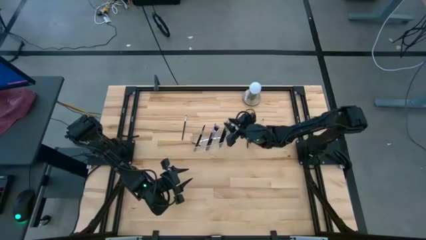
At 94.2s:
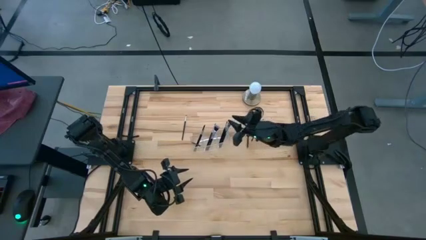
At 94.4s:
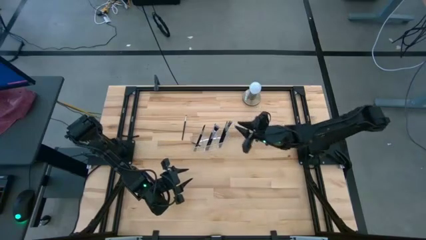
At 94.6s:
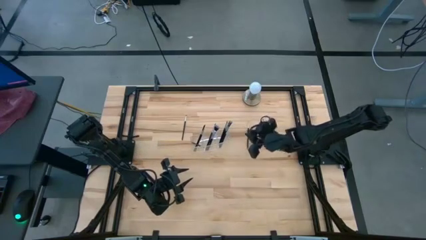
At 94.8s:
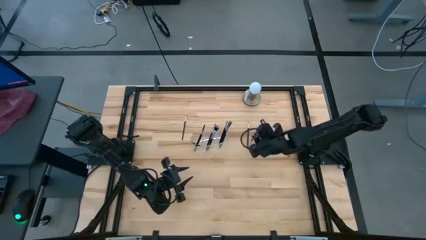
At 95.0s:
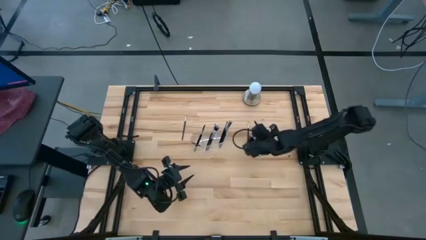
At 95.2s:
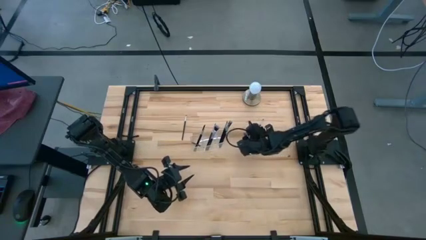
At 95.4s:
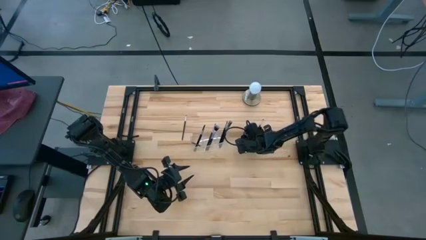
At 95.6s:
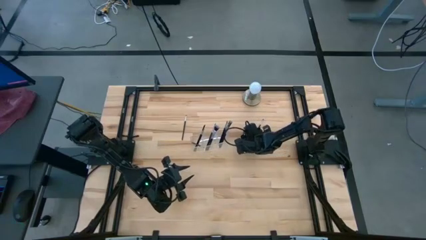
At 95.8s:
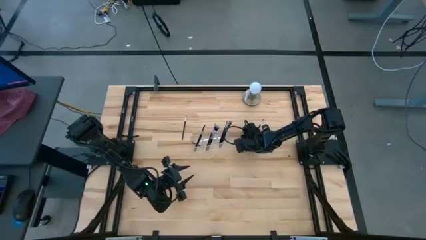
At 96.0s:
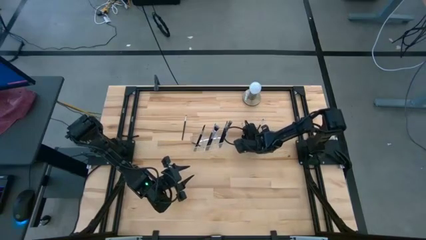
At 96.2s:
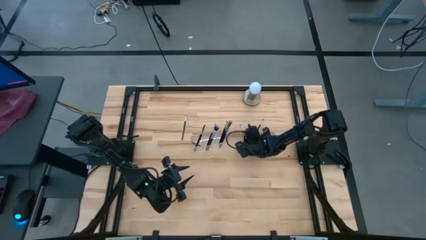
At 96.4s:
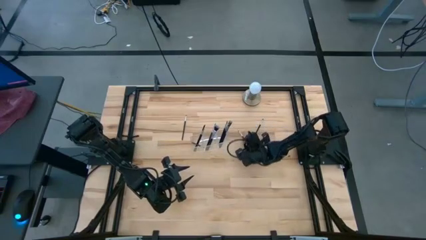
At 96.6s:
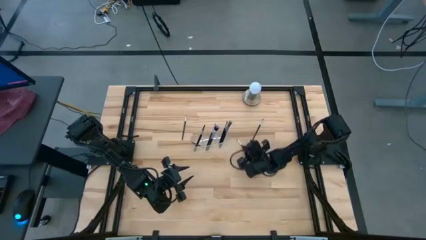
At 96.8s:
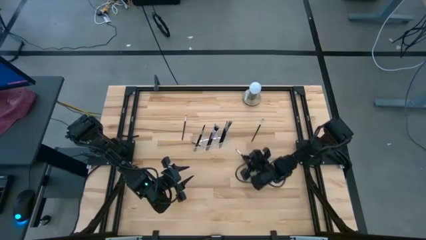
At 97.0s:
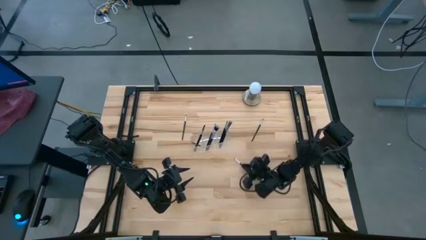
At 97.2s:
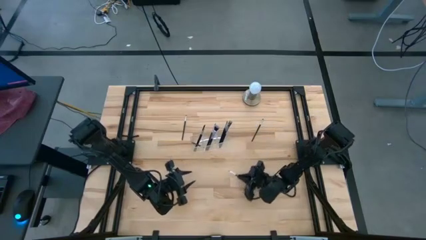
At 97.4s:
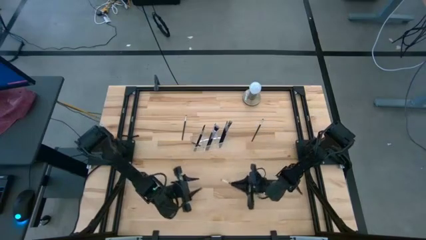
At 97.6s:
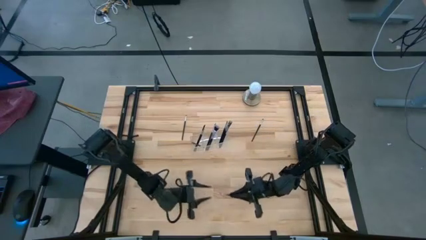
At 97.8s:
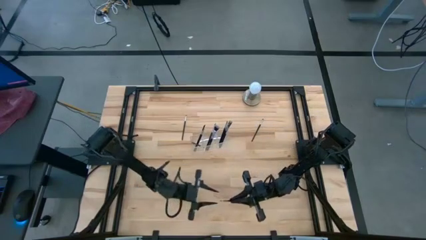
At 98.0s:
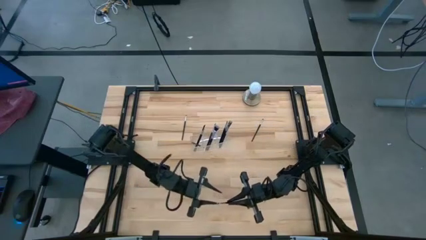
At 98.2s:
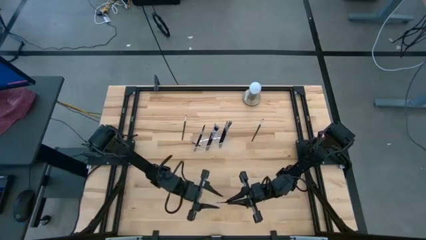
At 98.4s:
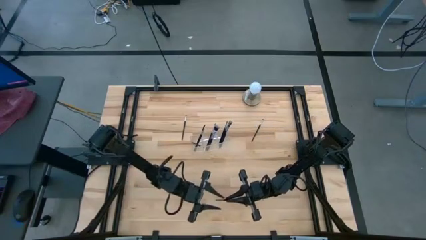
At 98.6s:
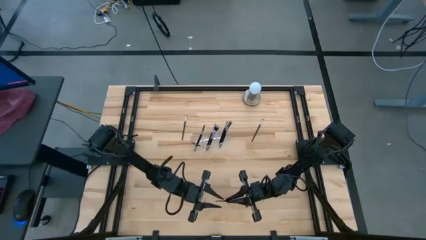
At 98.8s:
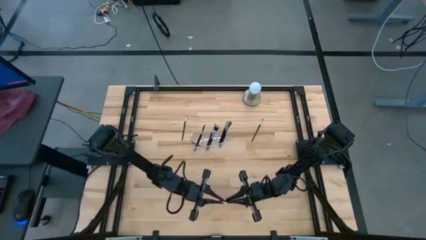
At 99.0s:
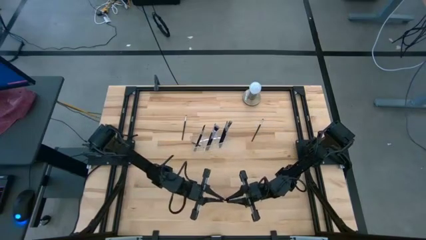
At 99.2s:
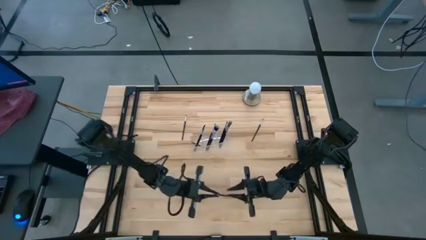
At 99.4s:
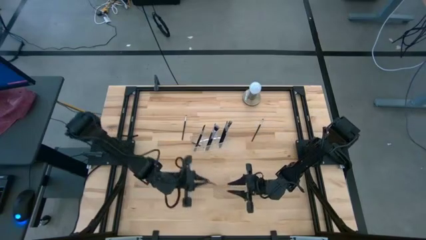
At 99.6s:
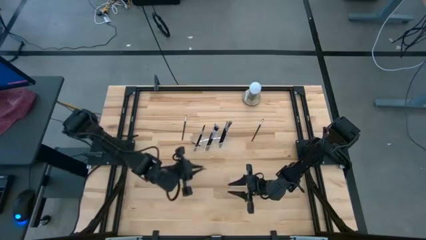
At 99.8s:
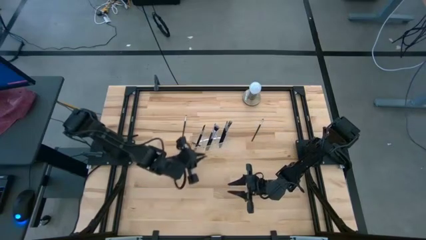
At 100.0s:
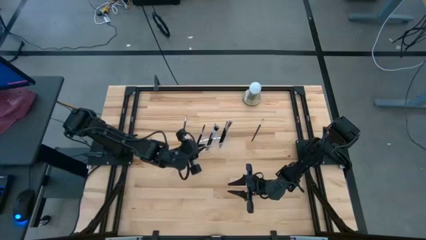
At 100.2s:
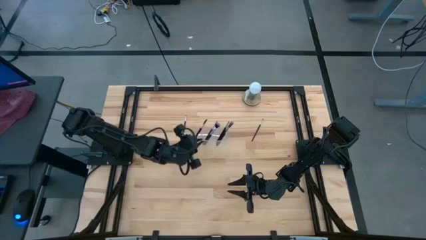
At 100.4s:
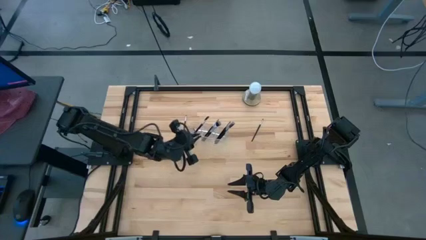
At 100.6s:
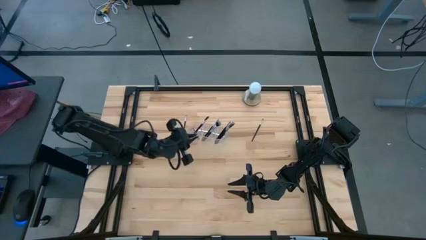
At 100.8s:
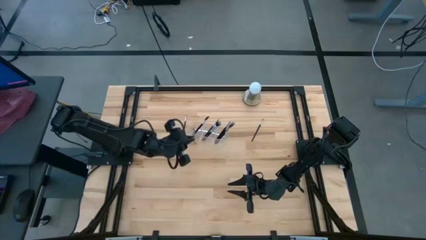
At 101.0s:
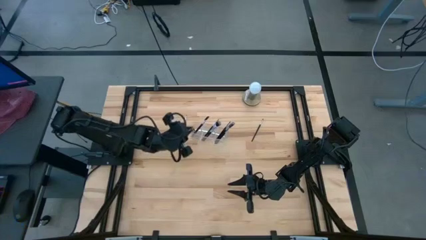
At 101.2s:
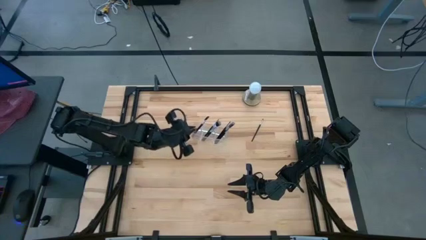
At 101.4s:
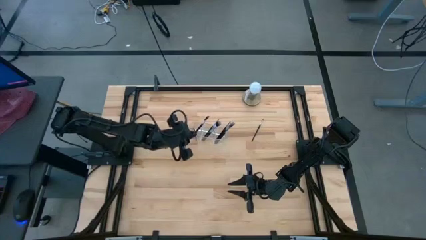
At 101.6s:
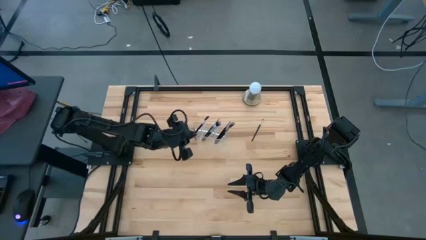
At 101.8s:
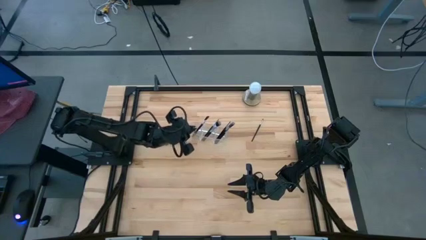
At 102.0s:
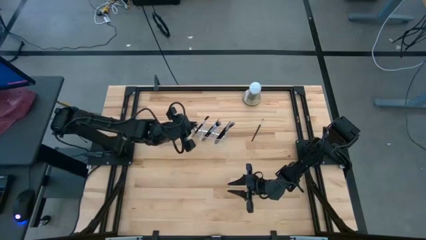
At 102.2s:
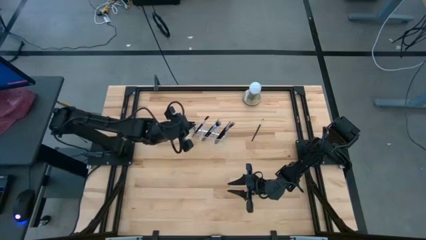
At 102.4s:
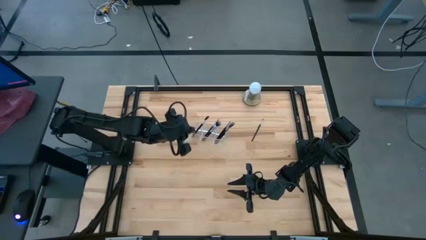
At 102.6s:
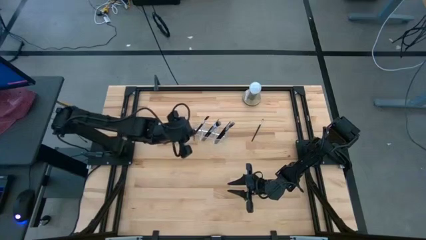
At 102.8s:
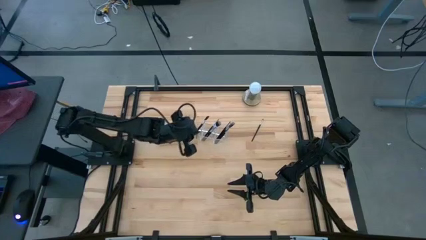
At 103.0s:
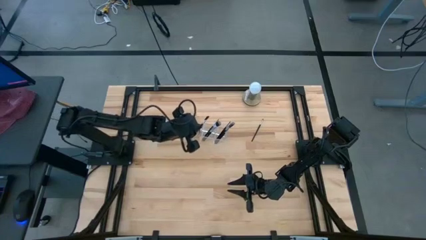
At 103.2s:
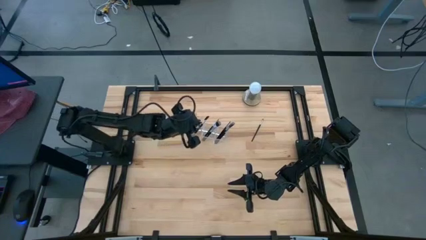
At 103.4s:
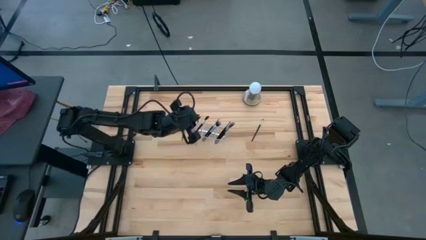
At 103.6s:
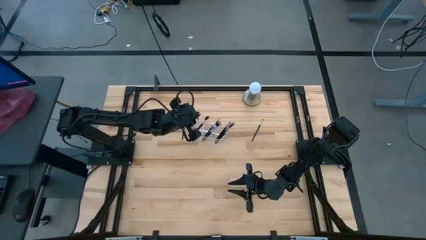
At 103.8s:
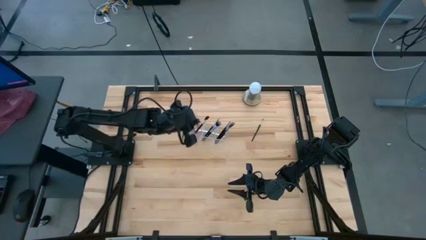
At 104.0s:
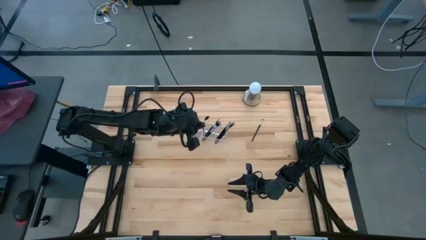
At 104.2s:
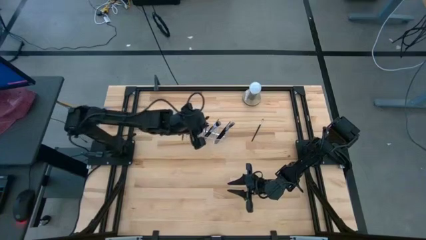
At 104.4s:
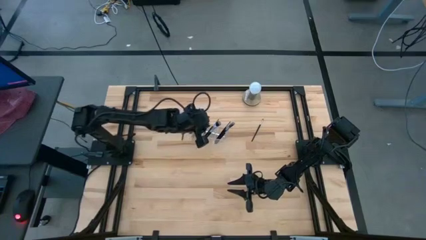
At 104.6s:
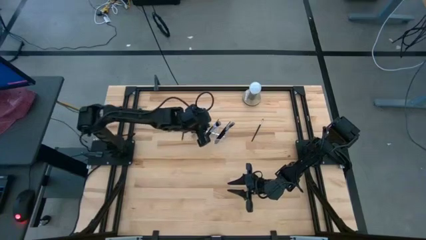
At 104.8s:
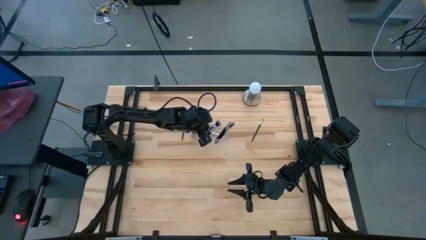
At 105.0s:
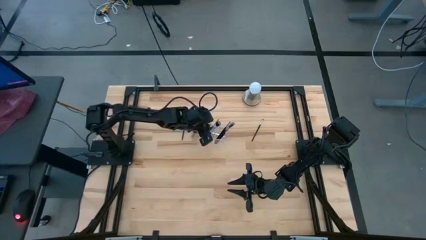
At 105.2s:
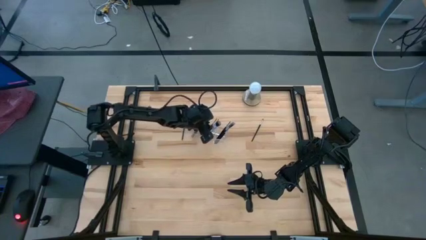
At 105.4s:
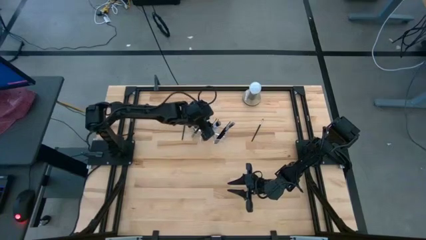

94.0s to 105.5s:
Task: Put items in baskets/containers
Put the eyeshadow brush into the transparent organizer

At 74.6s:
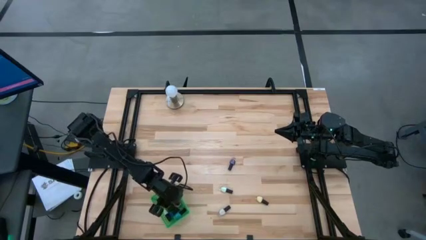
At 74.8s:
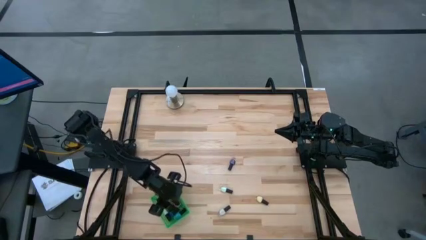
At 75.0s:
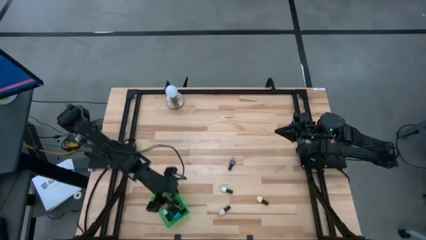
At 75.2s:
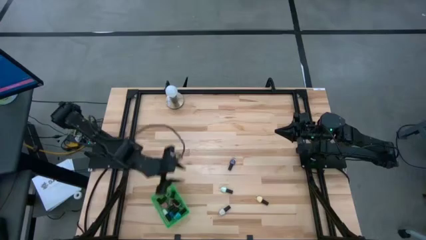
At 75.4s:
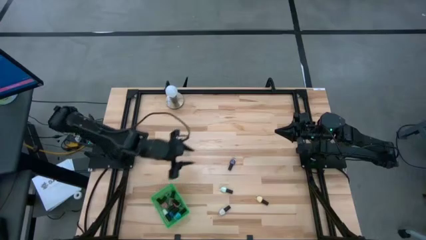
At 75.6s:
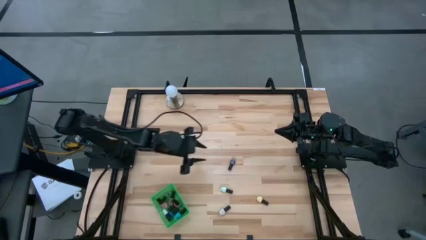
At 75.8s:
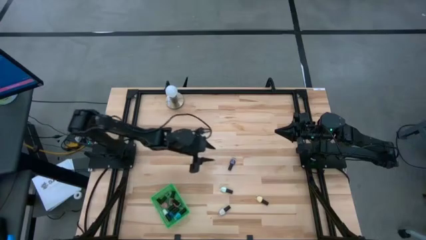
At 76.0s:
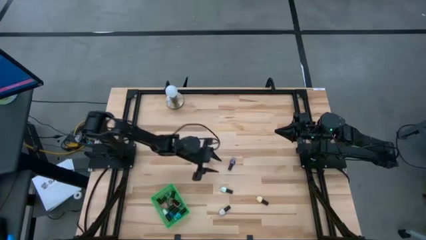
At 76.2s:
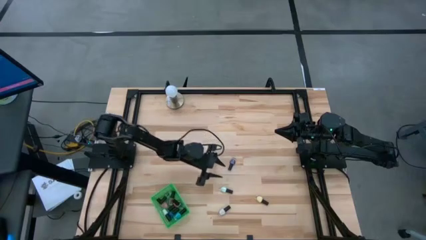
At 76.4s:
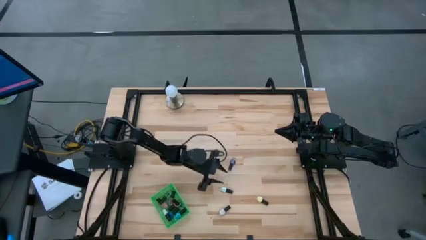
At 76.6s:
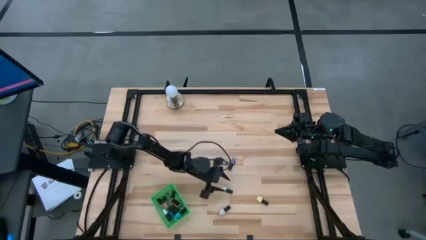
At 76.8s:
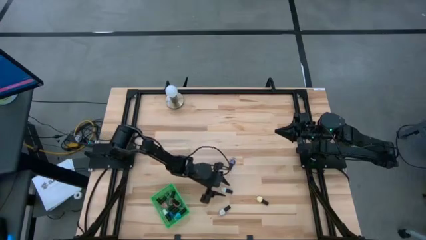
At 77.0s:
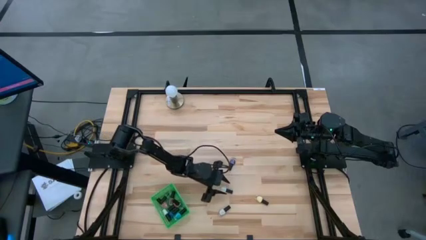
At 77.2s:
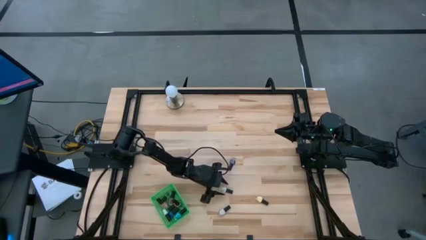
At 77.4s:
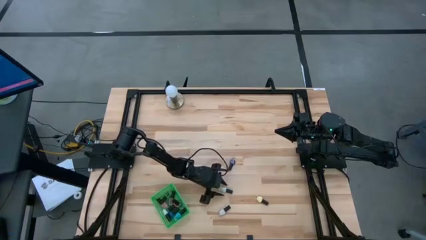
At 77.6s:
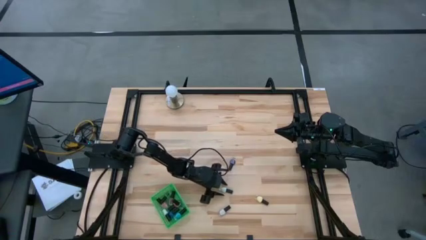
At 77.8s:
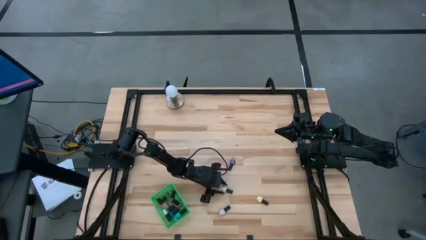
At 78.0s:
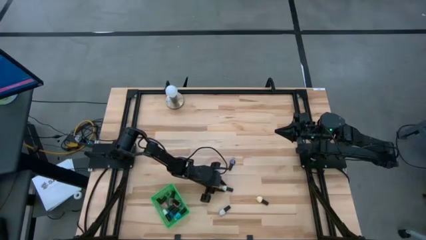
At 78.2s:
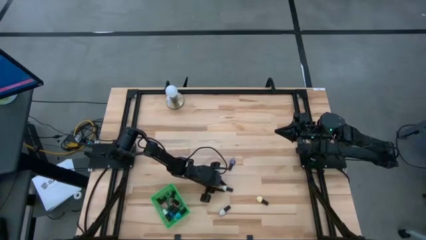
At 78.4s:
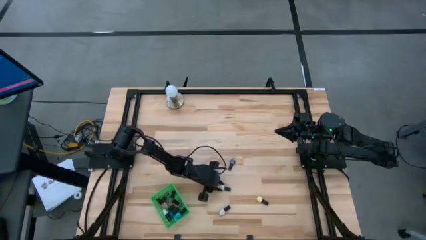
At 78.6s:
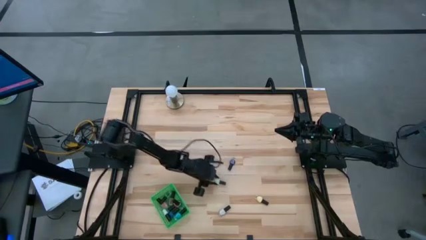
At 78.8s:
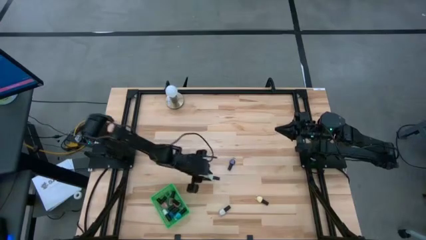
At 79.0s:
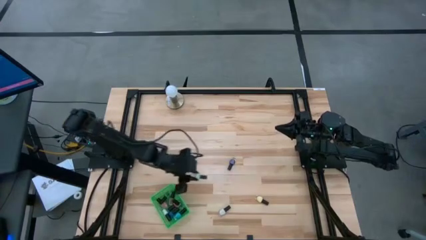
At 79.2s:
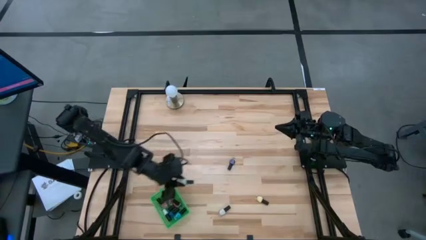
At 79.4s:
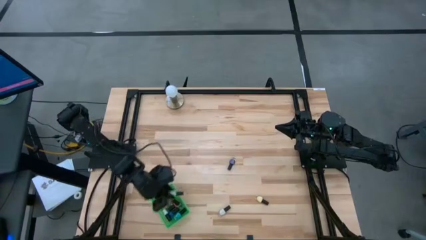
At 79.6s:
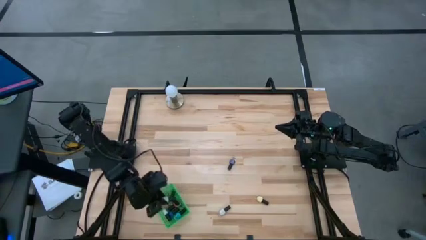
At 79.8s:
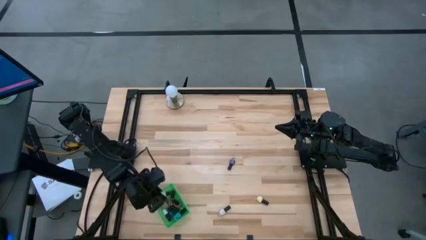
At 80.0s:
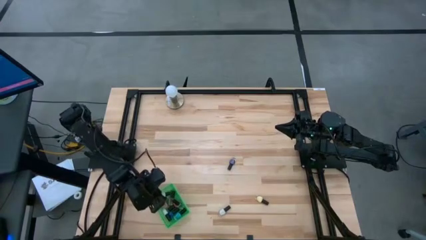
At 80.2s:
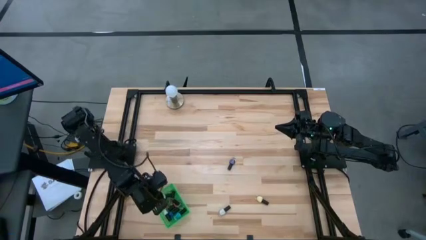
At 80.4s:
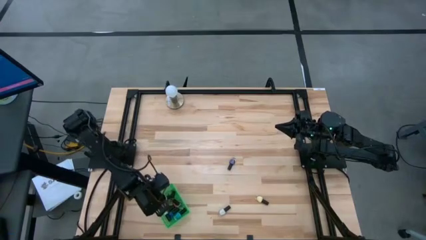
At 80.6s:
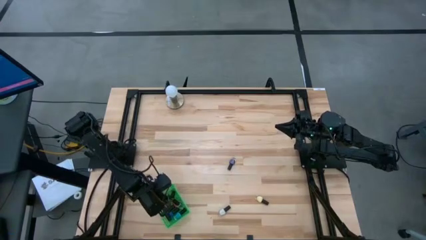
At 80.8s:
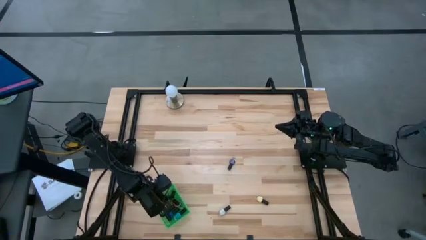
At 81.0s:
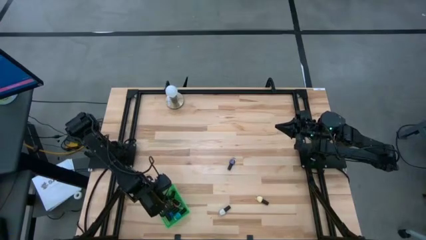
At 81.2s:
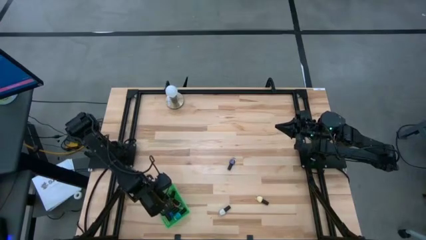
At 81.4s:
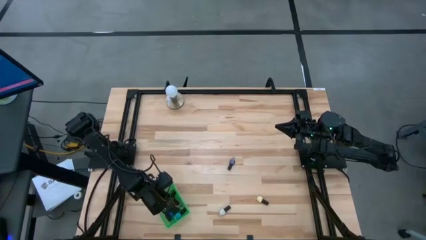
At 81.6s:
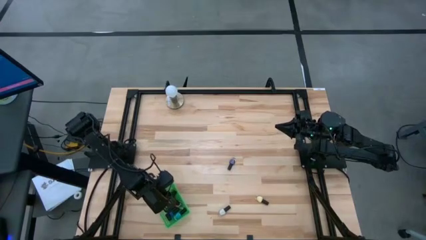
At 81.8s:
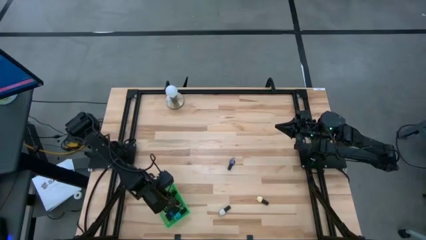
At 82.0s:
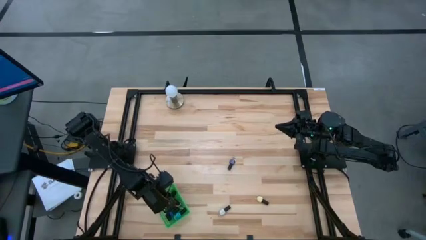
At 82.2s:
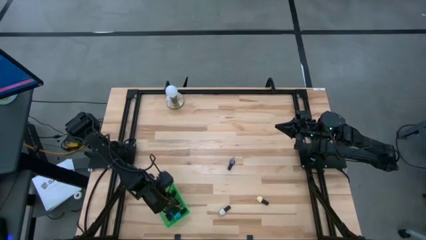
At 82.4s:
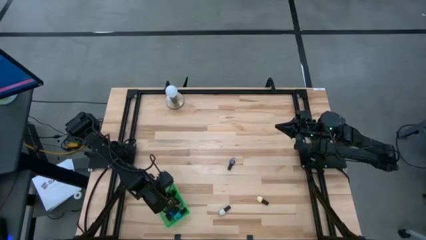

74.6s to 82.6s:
Task: Pick & Place Nail Polish
Put the top black white nail polish into the green basket
